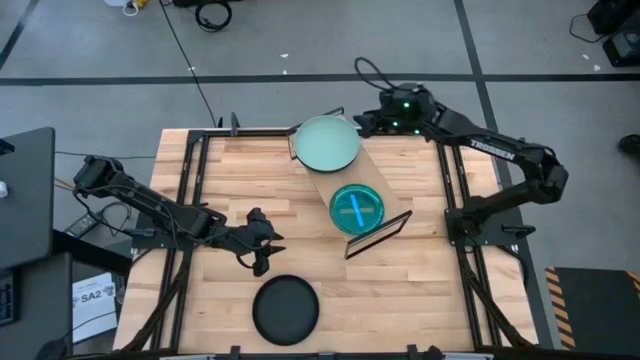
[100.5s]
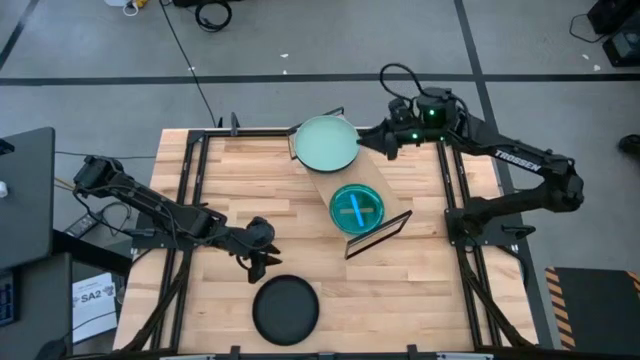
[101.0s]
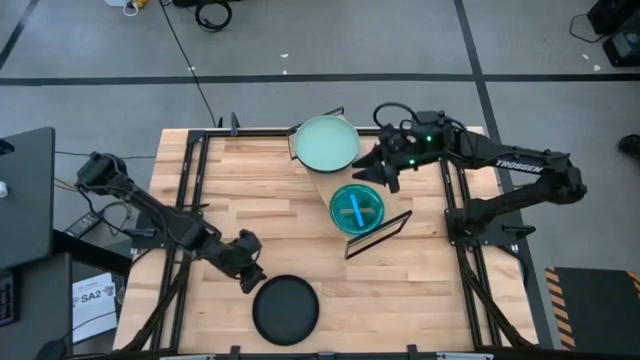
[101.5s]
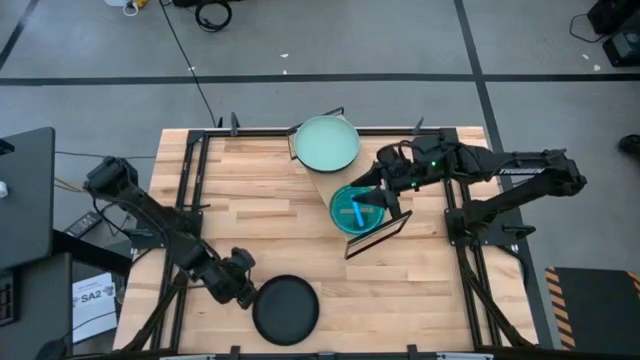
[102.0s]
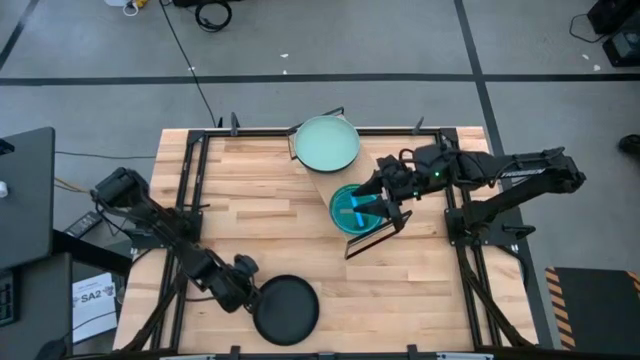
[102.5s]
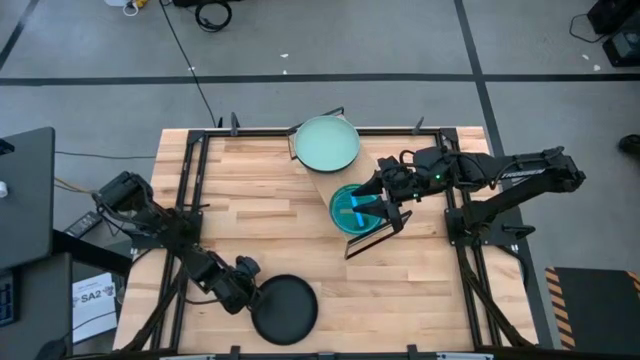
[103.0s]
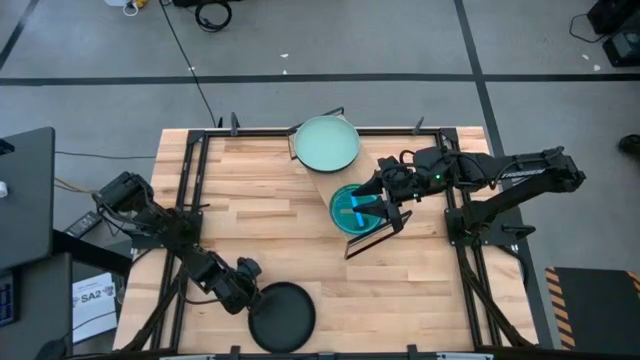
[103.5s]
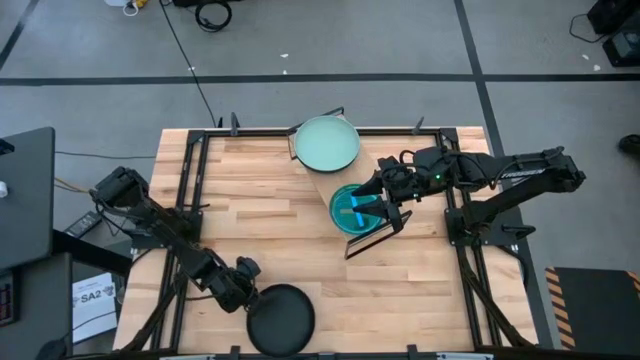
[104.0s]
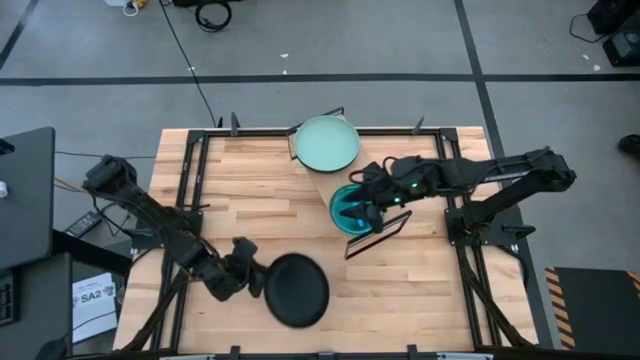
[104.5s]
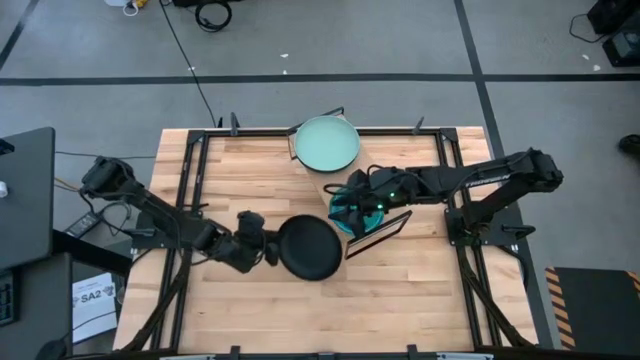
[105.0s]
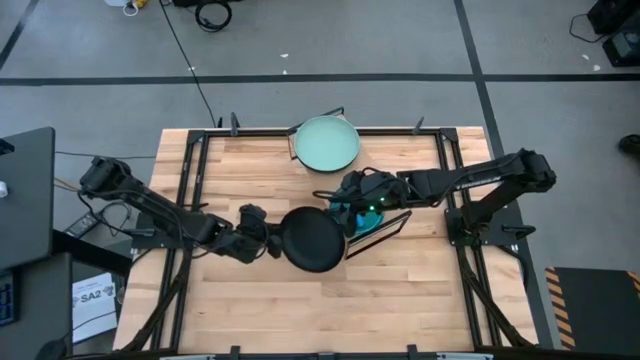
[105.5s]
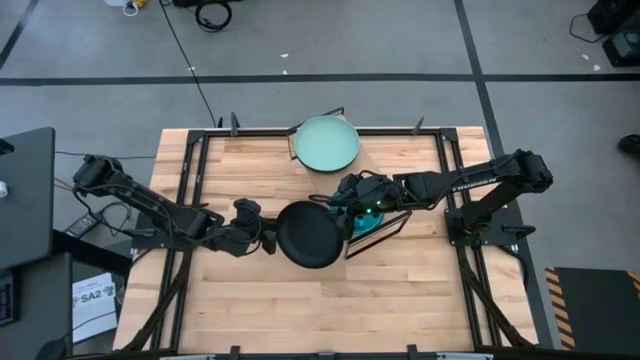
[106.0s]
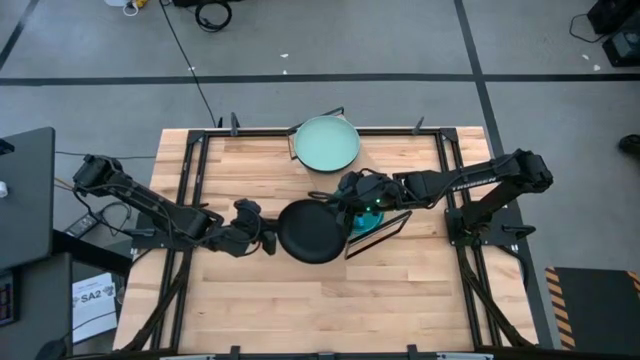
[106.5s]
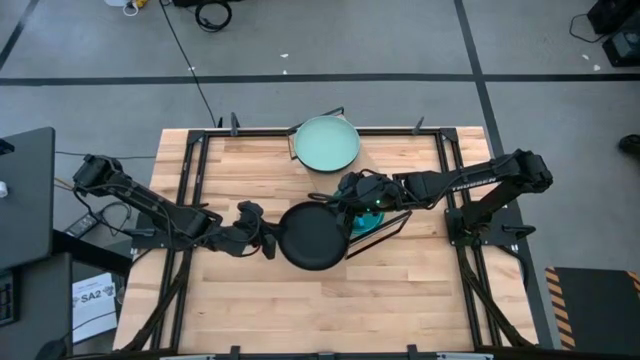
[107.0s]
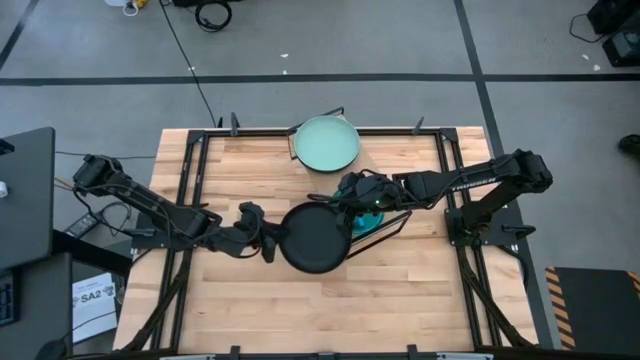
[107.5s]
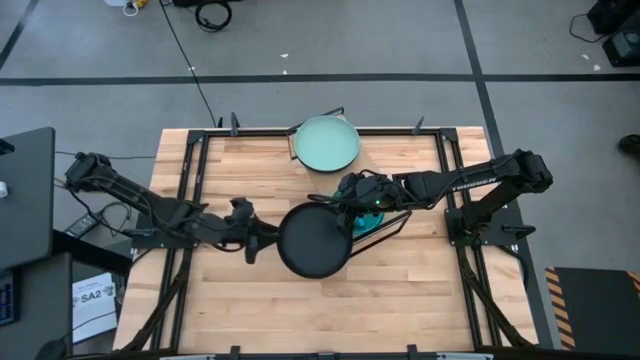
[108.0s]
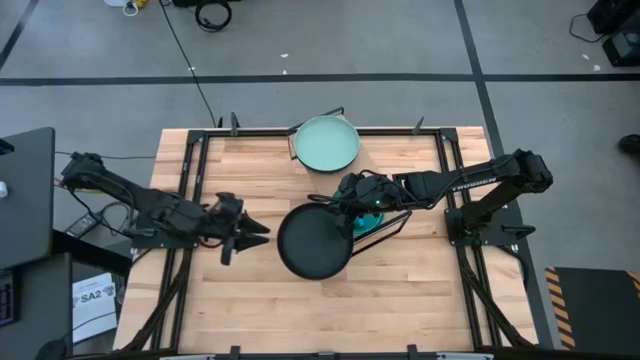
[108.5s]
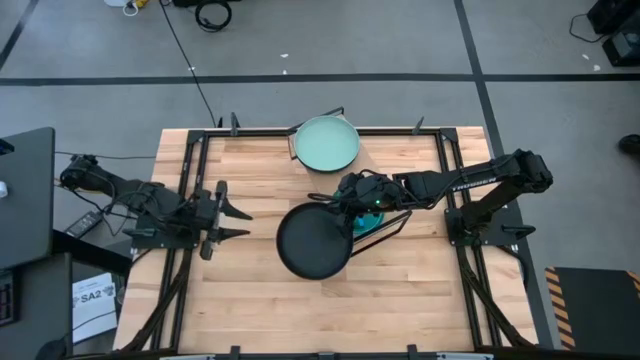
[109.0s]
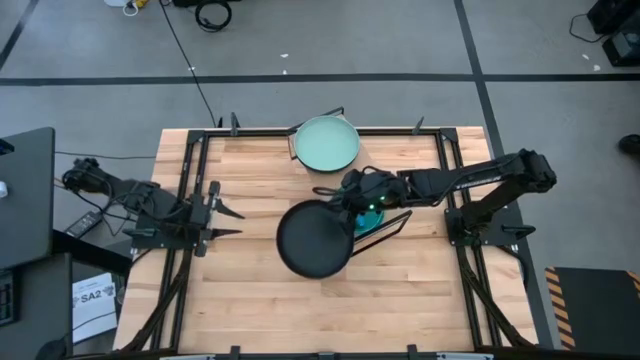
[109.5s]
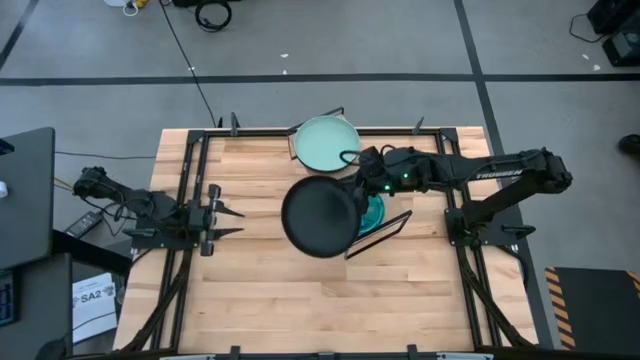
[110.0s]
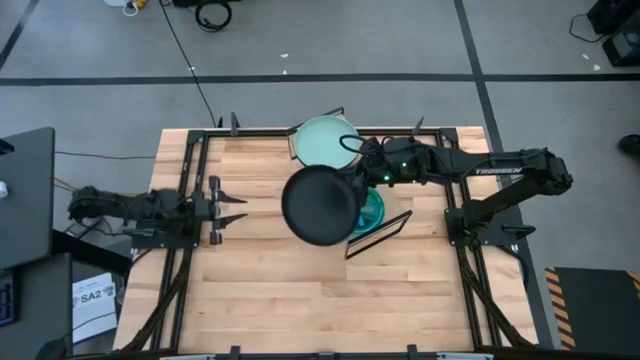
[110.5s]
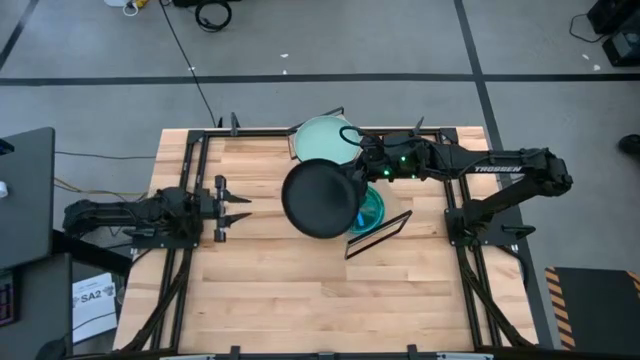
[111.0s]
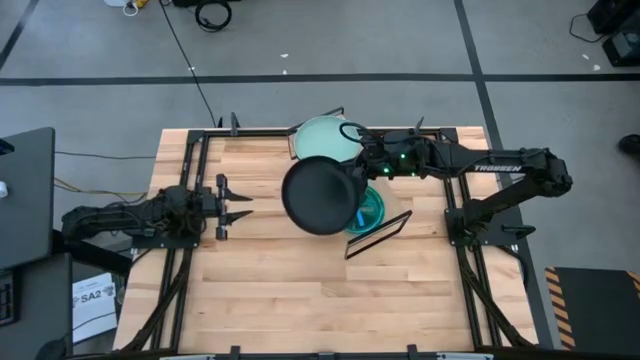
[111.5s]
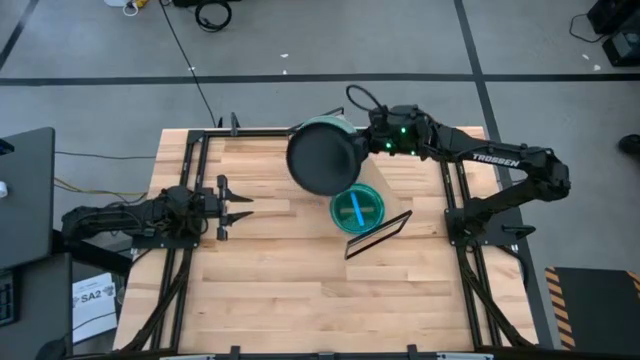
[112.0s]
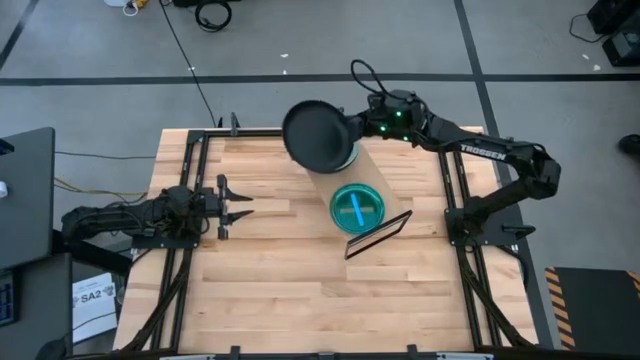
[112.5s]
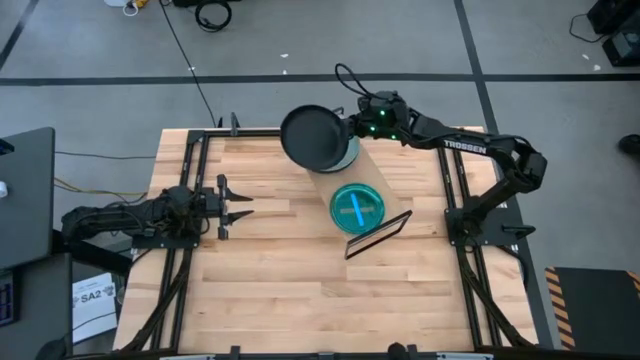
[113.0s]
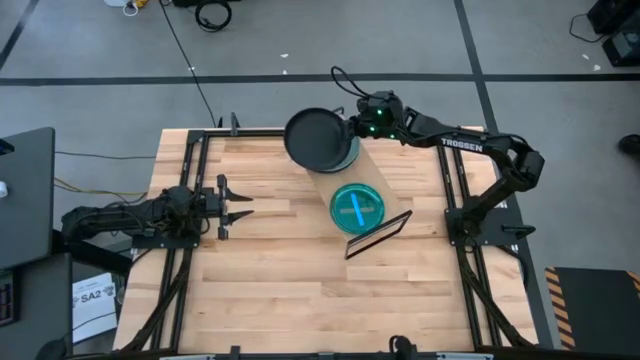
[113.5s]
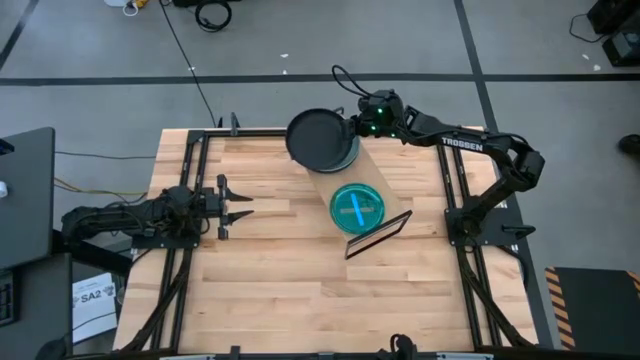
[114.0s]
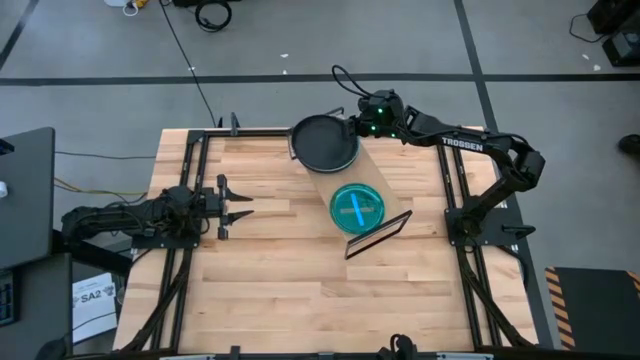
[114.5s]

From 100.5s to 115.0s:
Task: Place and stack plates onto a shelf
Stack the black plate on the top of the light gray plate on the shelf

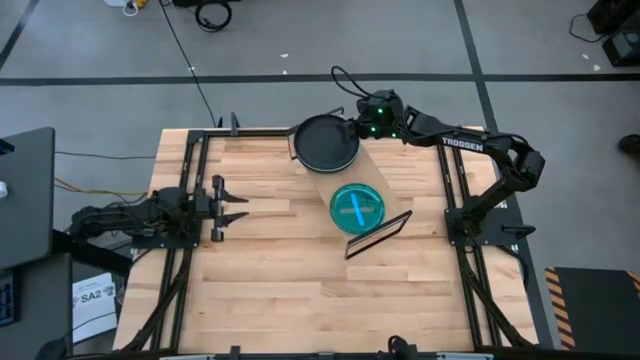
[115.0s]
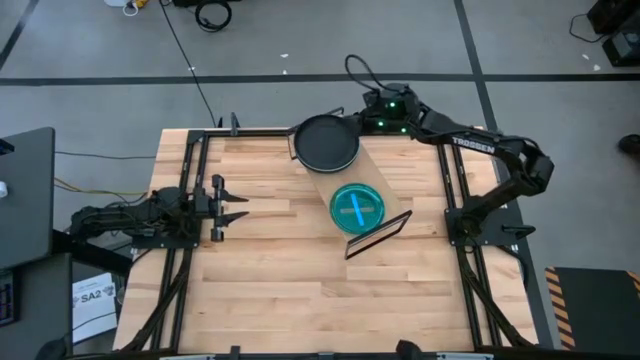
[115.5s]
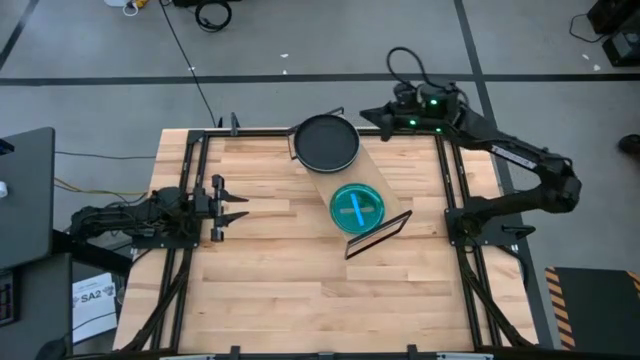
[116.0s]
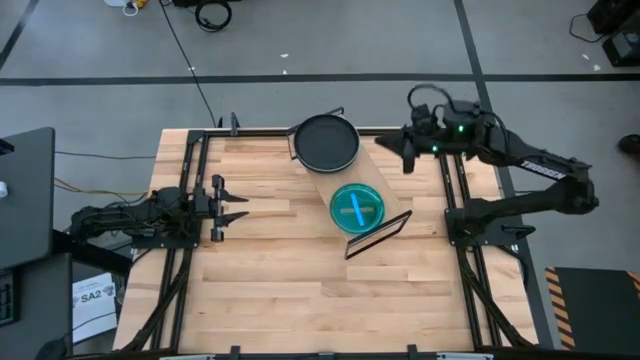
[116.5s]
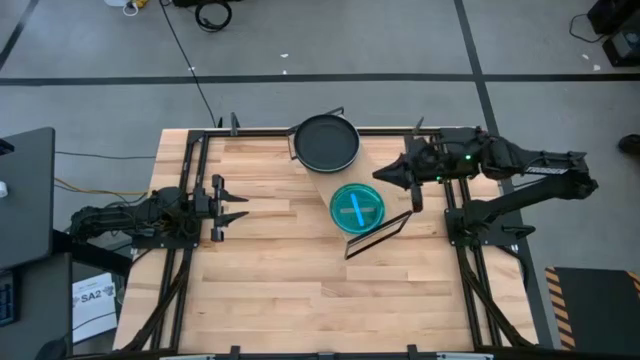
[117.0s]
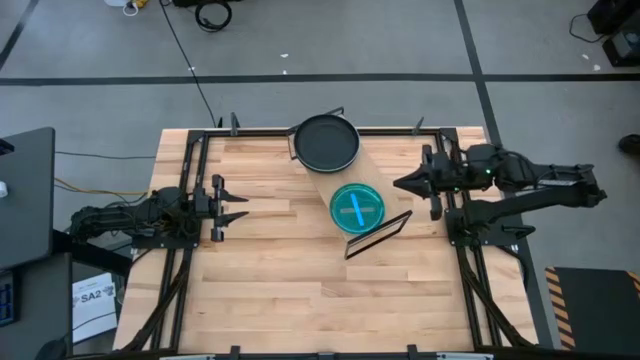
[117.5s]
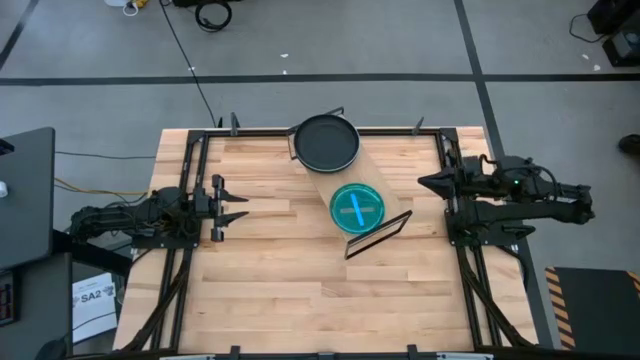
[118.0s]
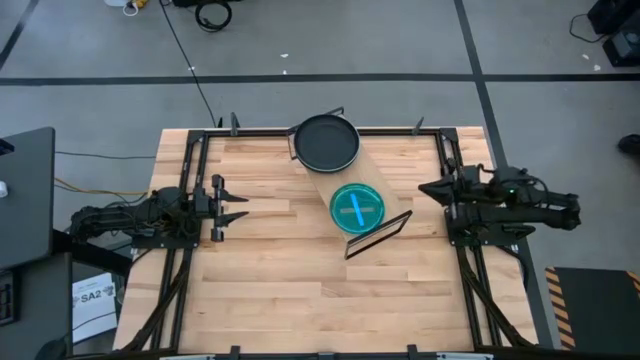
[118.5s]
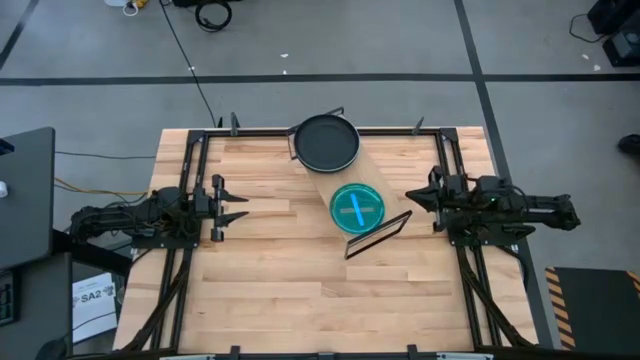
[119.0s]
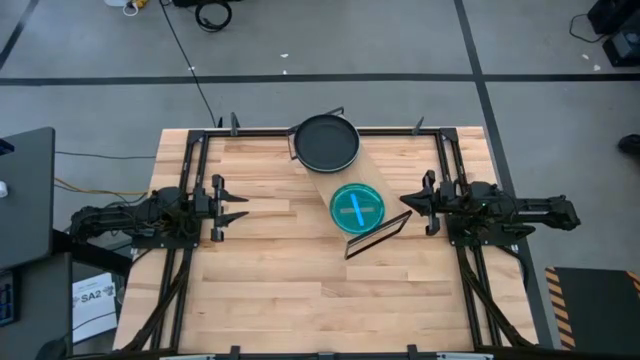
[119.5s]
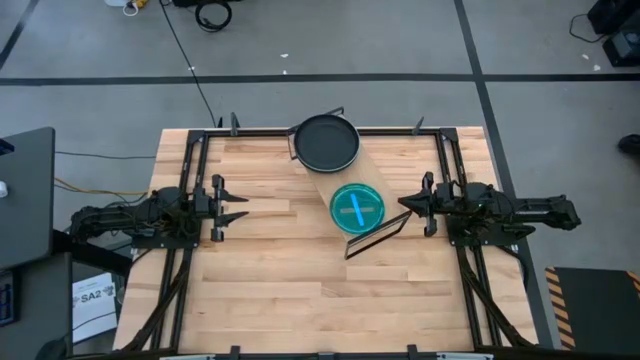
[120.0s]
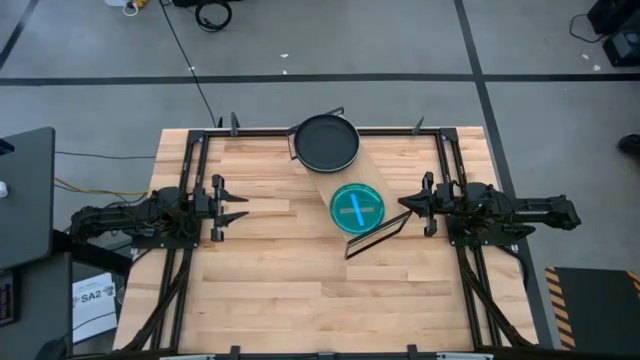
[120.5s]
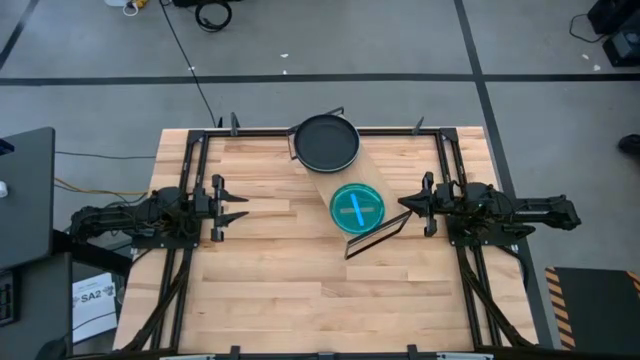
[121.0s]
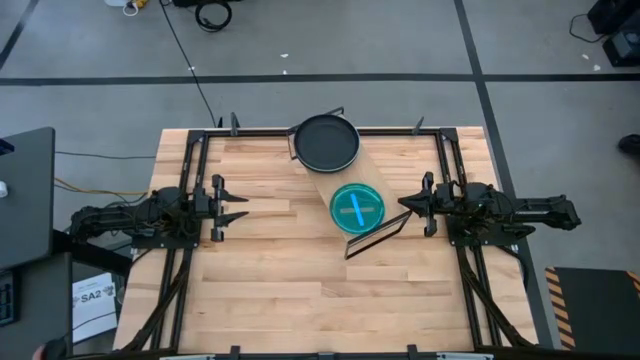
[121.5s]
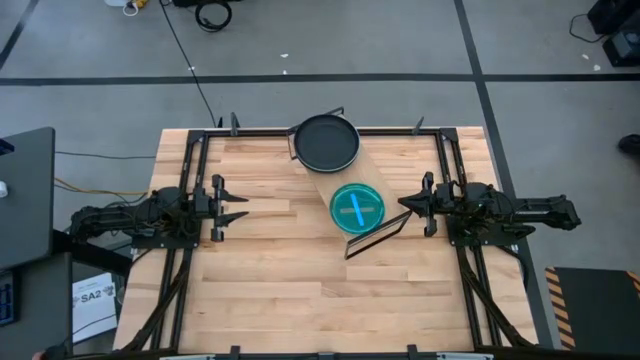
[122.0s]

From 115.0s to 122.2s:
Return to Home Position

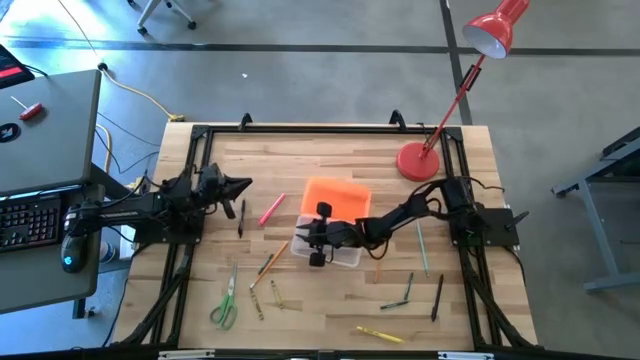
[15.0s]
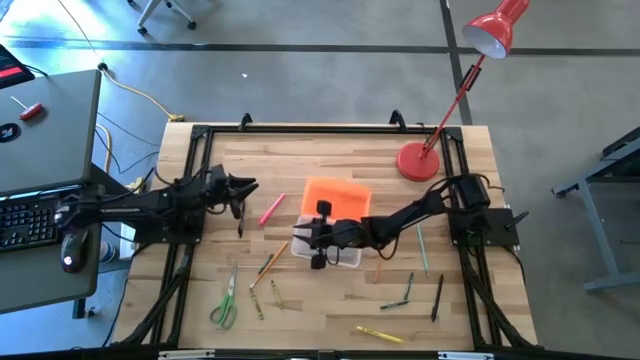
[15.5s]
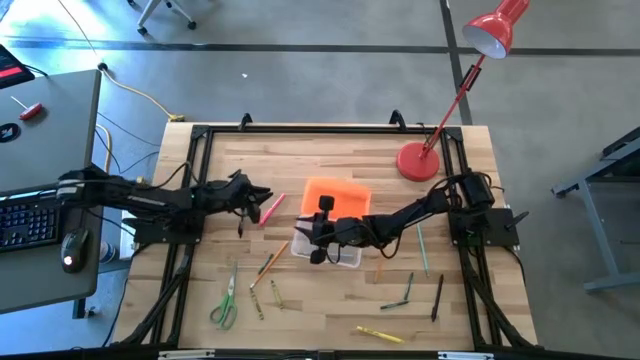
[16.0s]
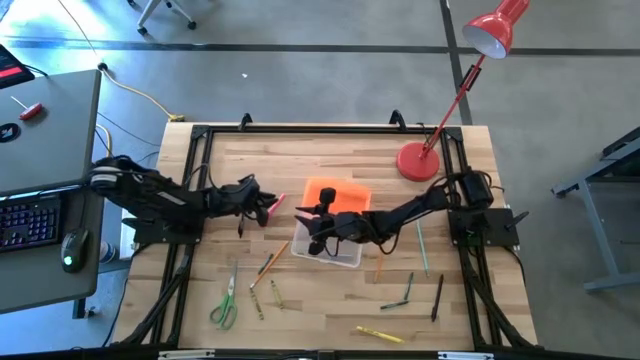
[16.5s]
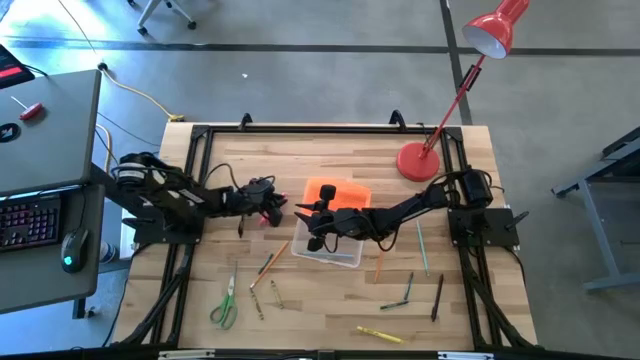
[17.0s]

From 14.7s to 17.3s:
Task: Pick & place school supplies into a supply box
Put the pink pen into the supply box
